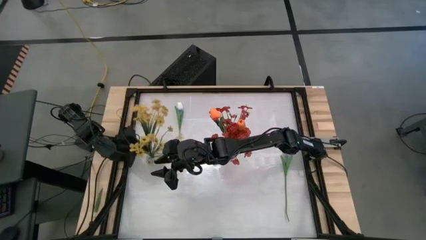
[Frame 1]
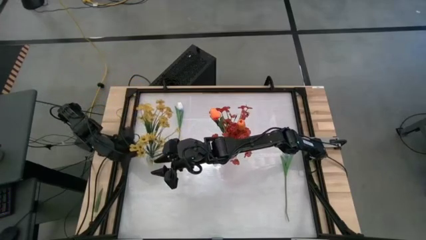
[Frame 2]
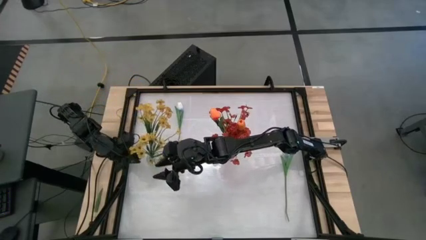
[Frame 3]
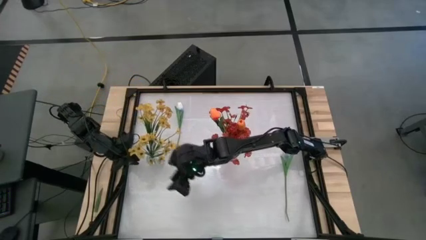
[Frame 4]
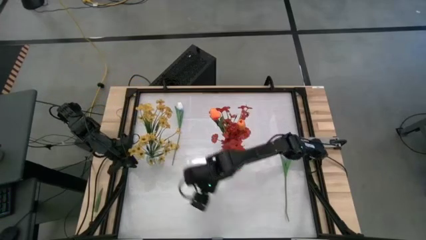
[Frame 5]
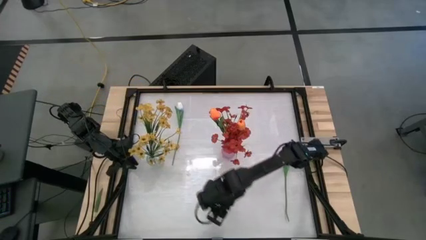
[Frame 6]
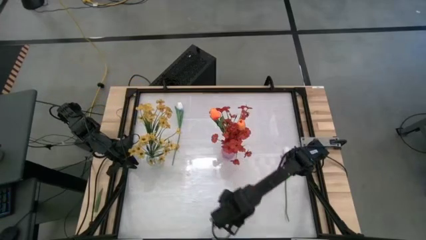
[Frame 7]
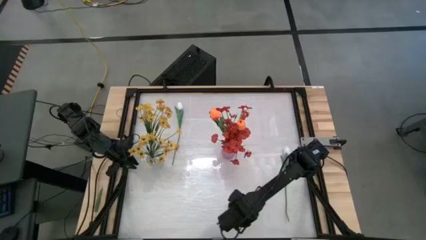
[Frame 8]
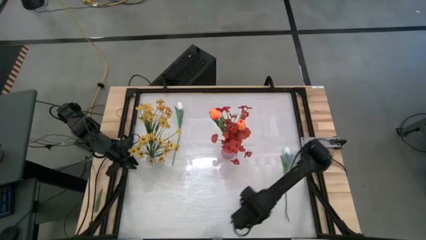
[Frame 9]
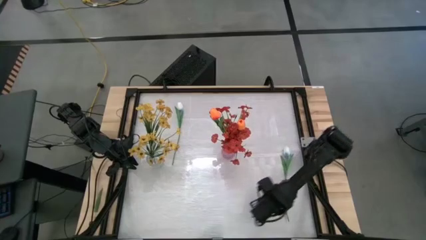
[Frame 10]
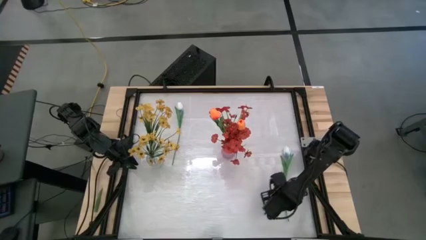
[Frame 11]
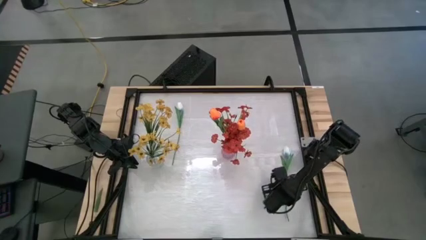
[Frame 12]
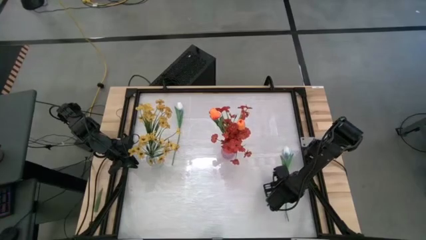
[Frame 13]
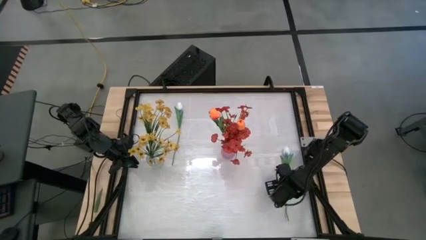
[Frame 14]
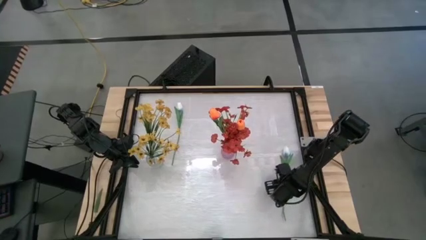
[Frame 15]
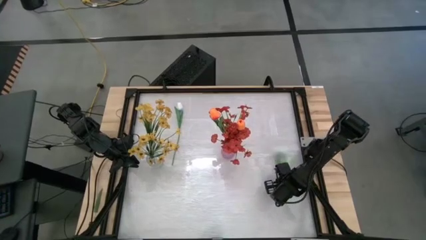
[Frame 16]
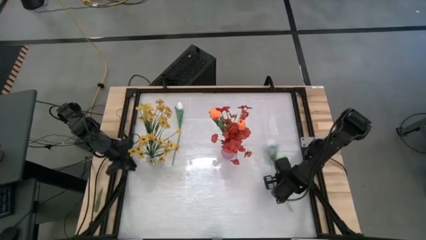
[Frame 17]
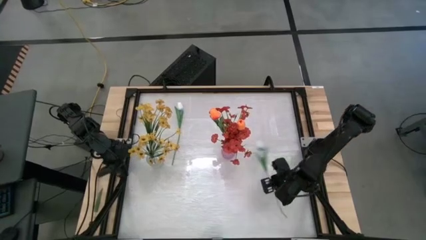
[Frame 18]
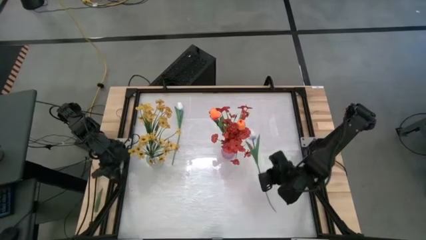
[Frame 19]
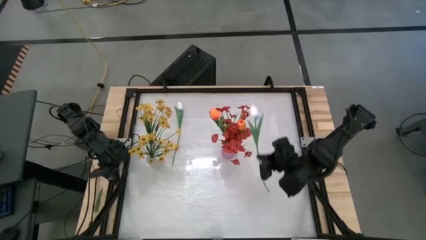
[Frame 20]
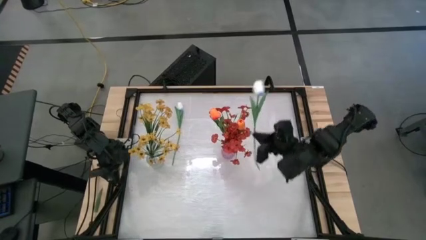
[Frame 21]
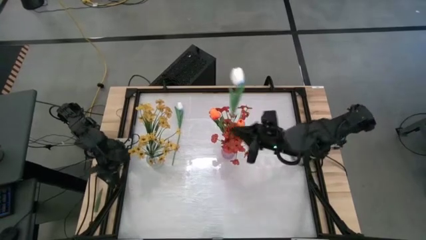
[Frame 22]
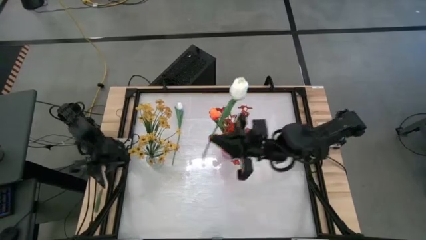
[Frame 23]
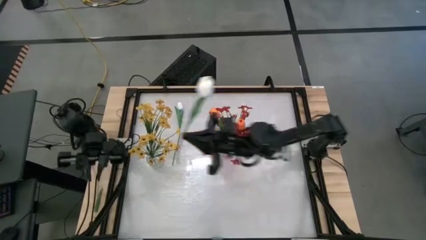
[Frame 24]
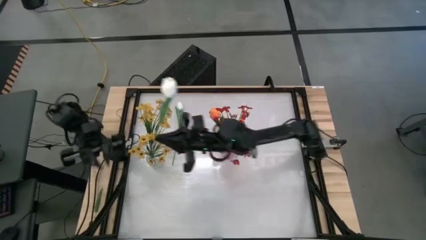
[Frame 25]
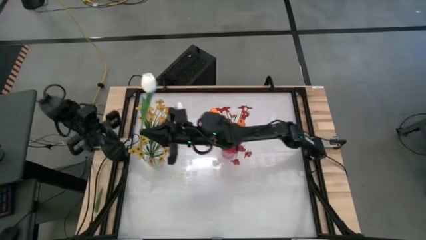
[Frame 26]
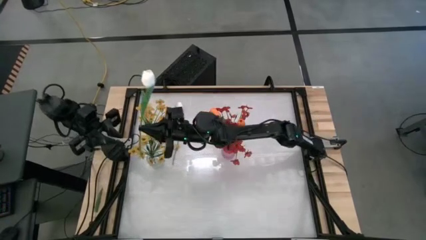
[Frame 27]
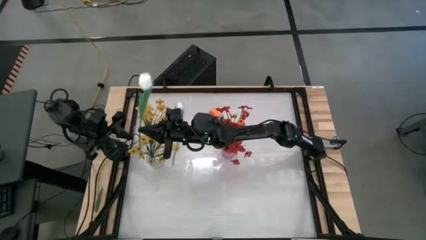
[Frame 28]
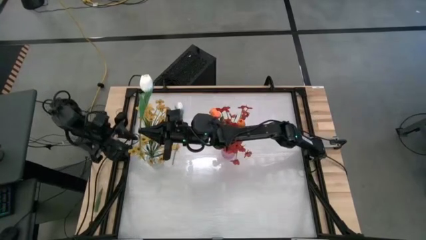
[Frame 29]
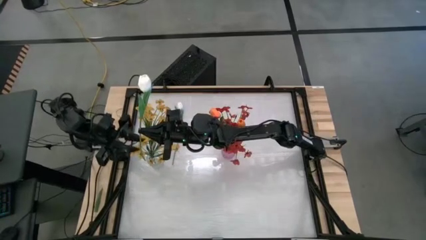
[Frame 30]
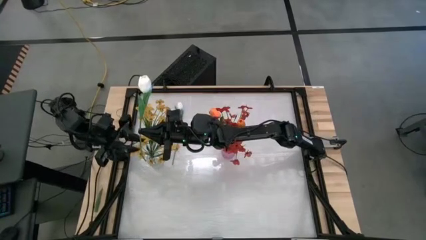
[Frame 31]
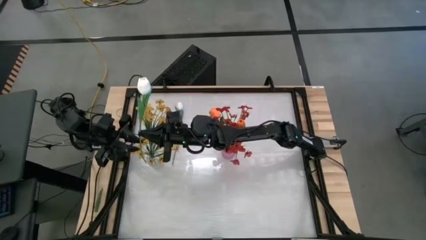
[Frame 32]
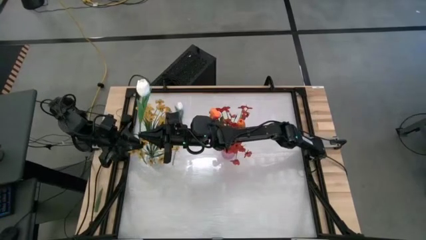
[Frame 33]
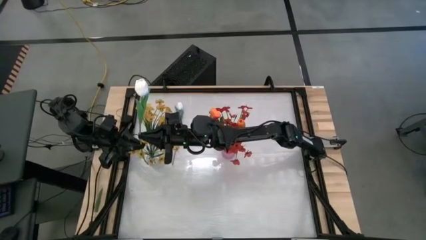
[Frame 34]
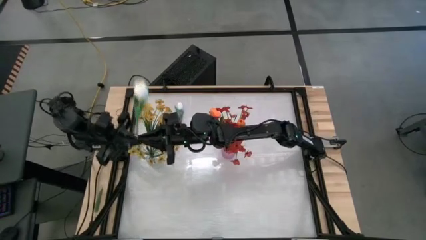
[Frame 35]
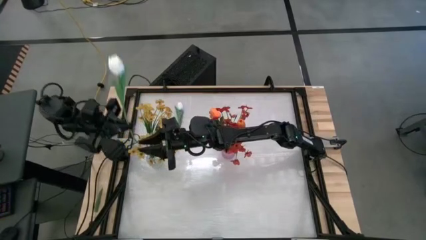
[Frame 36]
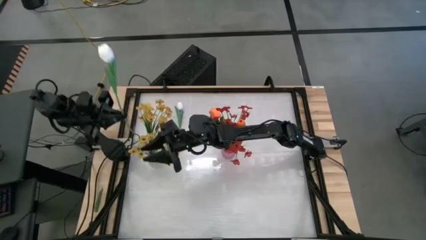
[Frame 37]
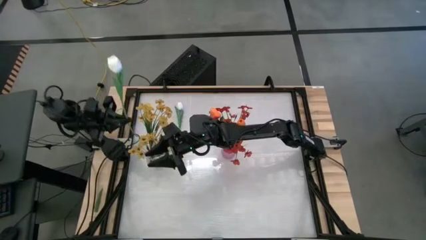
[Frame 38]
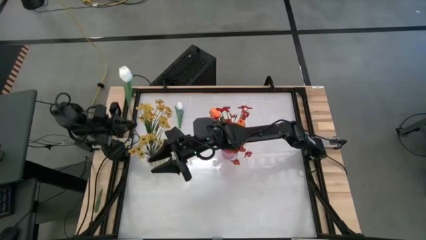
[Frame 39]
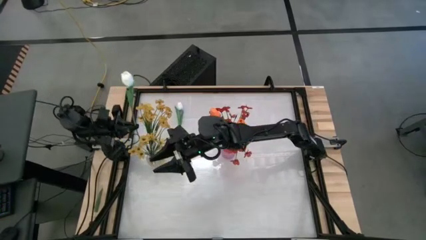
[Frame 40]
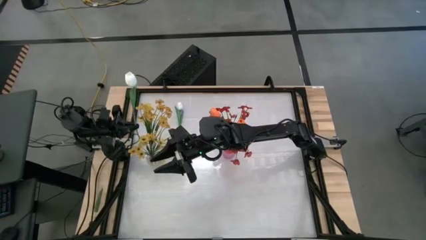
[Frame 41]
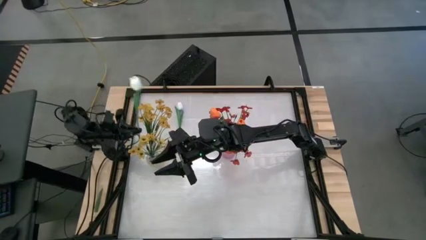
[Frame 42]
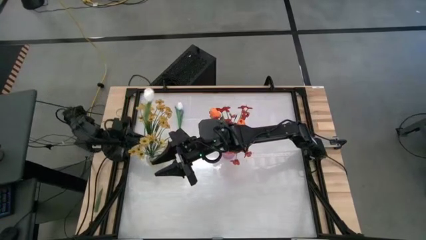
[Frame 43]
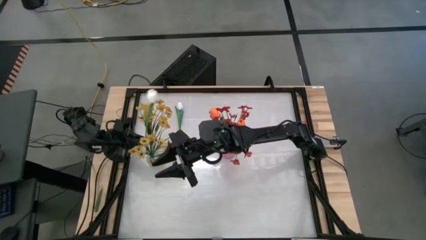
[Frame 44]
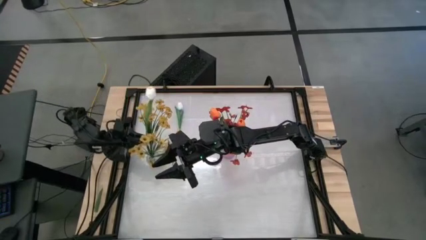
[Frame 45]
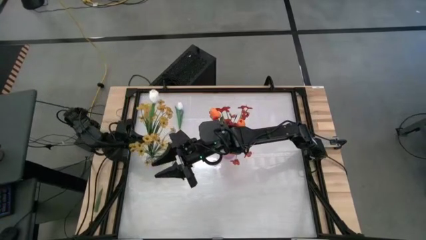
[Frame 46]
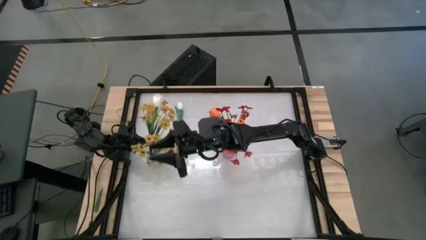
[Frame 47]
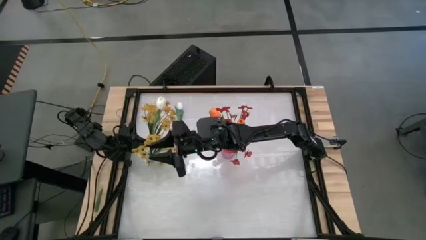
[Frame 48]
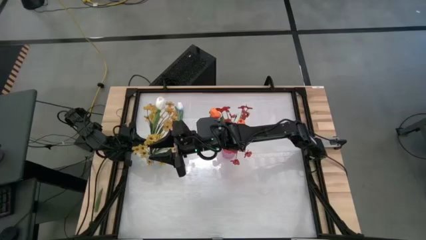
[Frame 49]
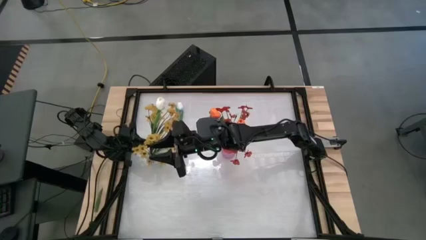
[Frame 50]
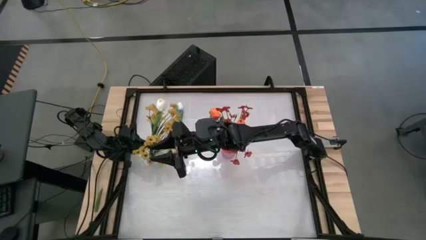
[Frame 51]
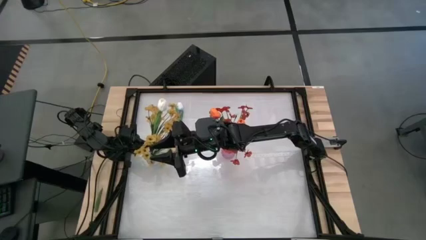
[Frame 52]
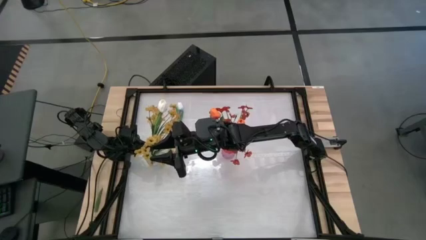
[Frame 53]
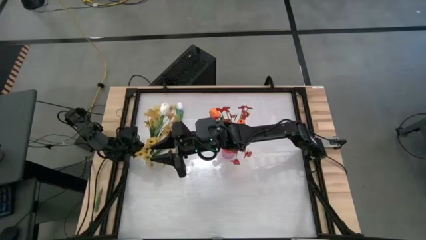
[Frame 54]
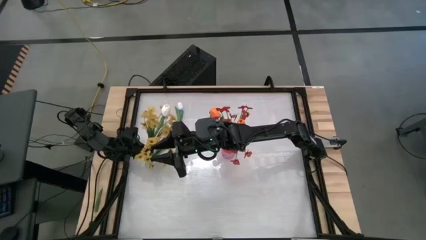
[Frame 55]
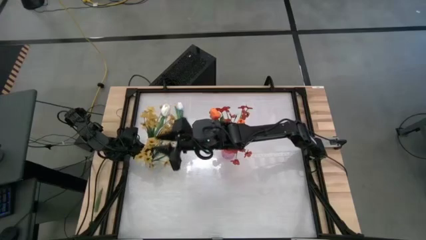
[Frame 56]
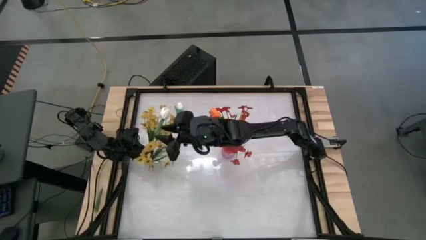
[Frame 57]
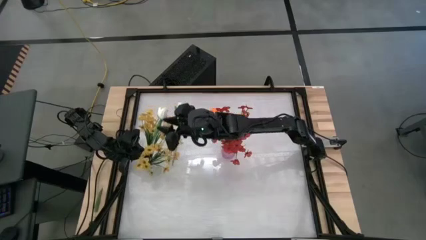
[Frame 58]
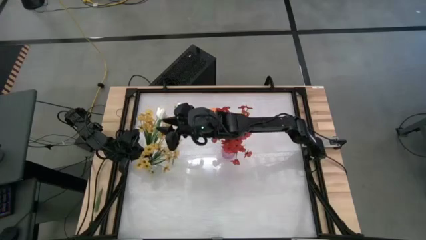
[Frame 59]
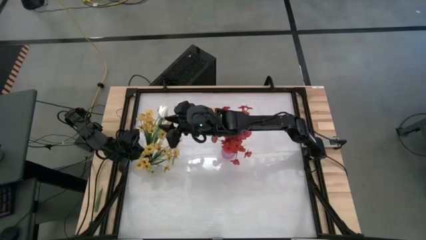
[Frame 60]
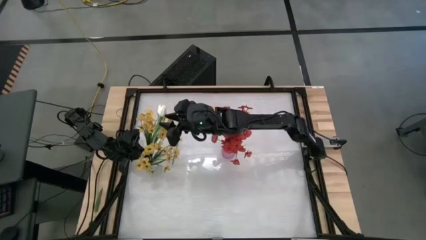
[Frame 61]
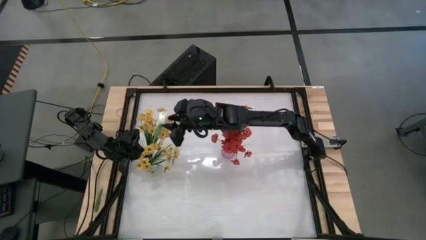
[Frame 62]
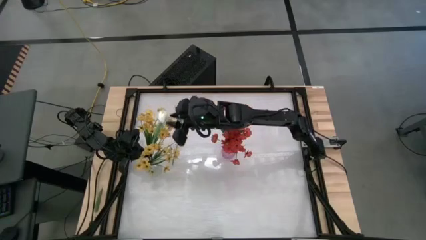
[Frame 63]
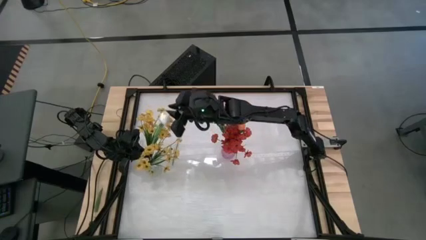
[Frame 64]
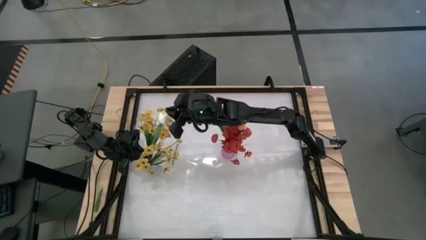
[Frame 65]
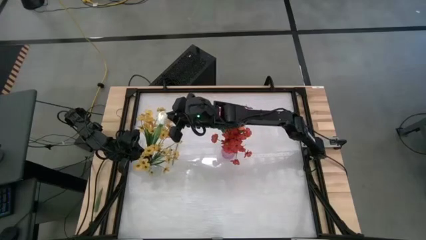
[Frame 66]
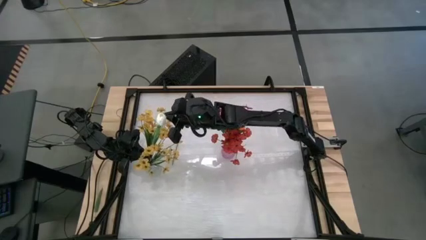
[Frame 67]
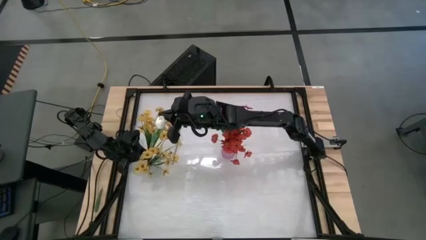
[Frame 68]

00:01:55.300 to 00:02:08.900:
Task: Sort flowers into vase by color
Put the bottom white flower into the transparent vase
